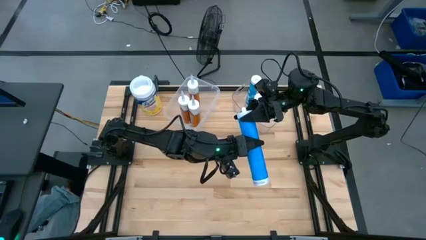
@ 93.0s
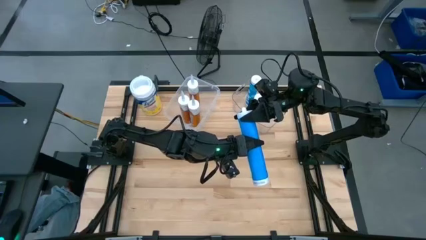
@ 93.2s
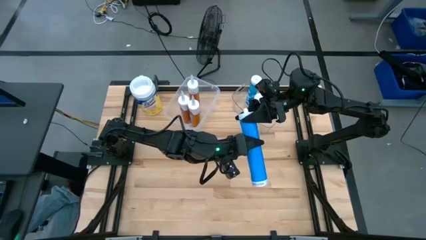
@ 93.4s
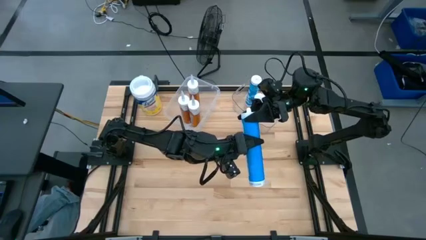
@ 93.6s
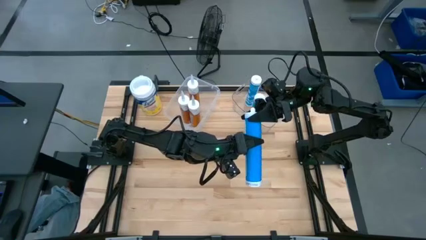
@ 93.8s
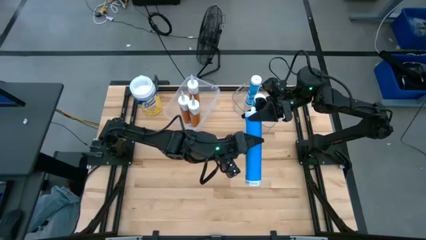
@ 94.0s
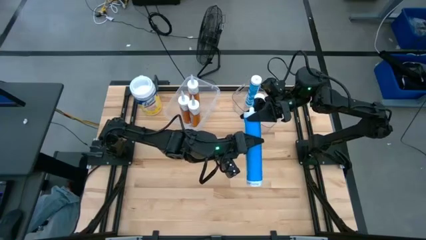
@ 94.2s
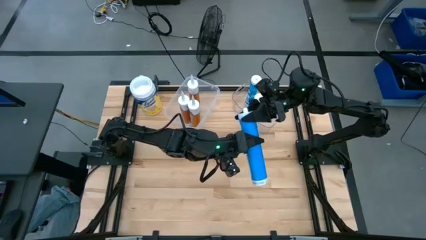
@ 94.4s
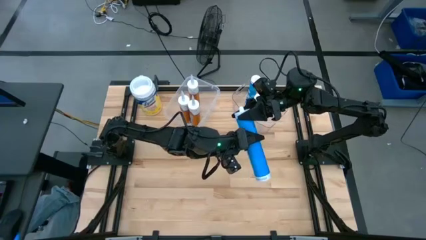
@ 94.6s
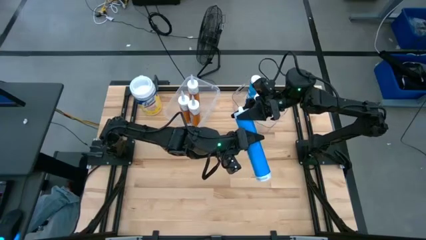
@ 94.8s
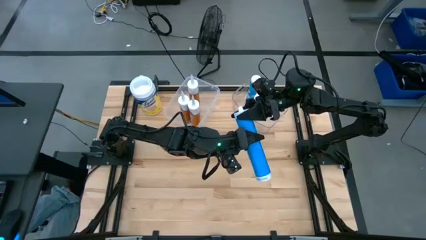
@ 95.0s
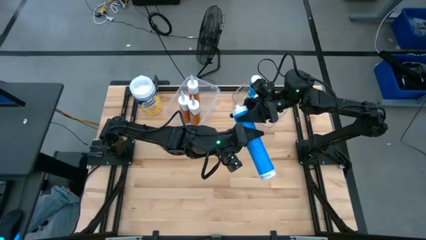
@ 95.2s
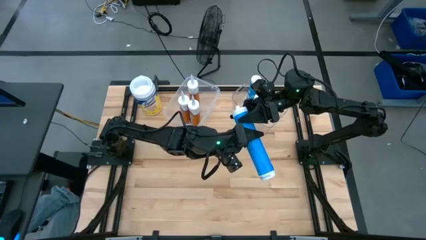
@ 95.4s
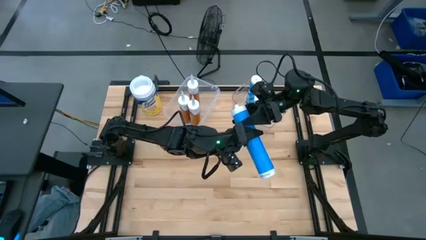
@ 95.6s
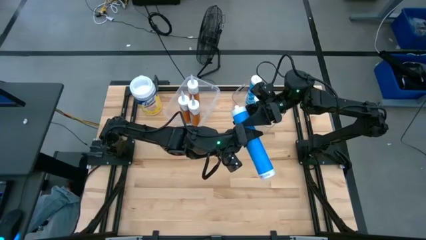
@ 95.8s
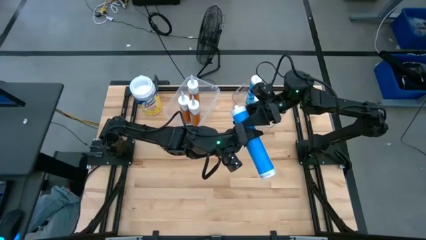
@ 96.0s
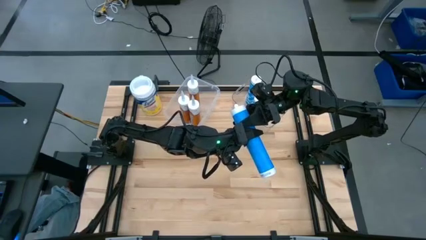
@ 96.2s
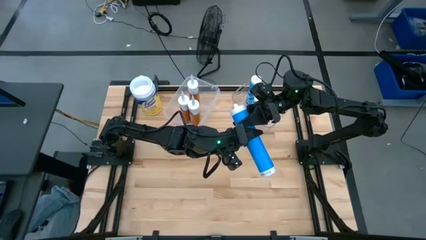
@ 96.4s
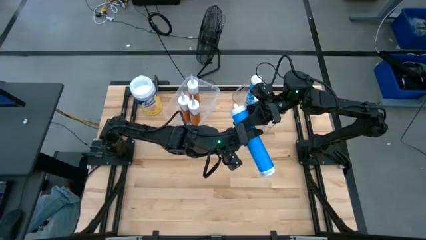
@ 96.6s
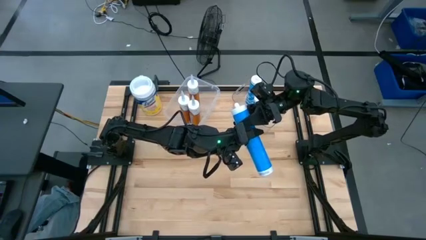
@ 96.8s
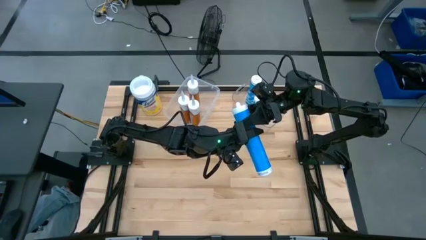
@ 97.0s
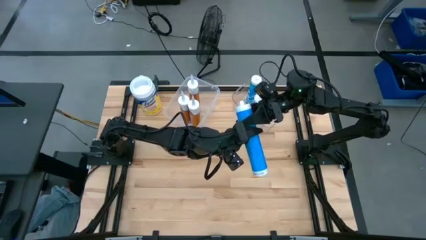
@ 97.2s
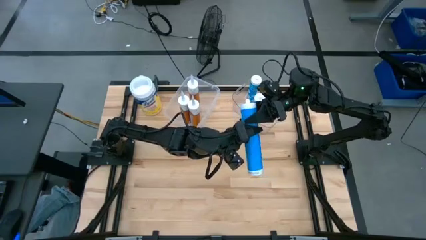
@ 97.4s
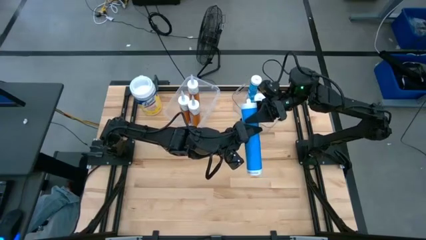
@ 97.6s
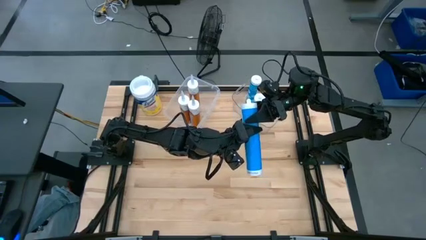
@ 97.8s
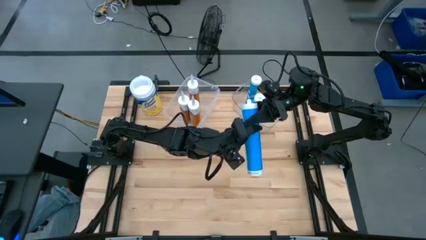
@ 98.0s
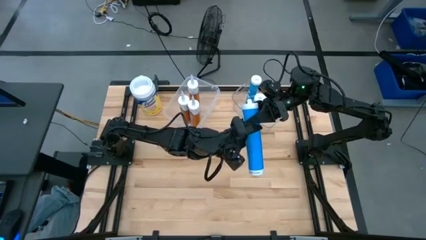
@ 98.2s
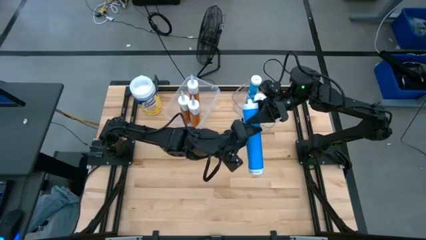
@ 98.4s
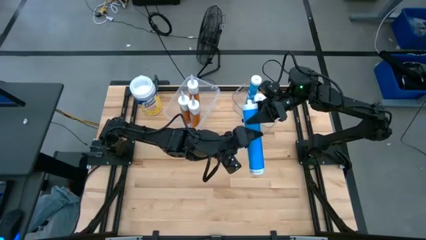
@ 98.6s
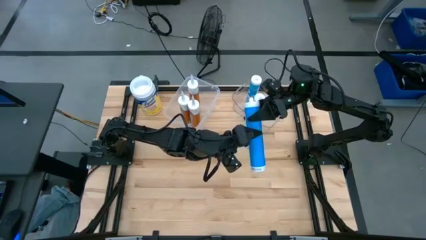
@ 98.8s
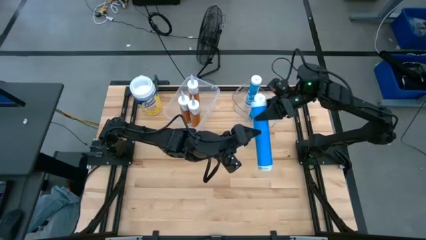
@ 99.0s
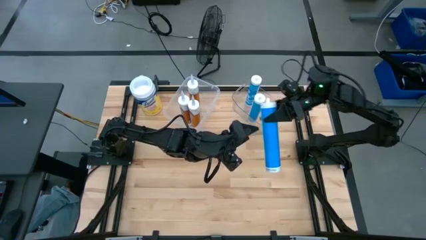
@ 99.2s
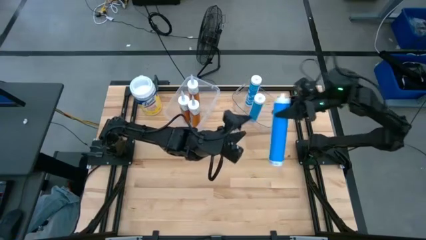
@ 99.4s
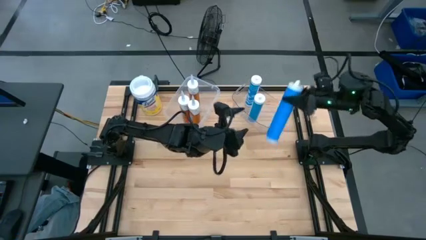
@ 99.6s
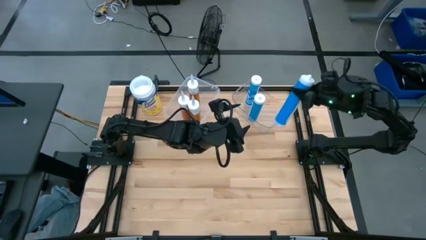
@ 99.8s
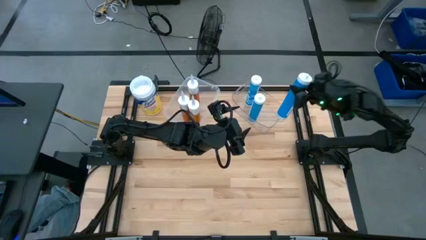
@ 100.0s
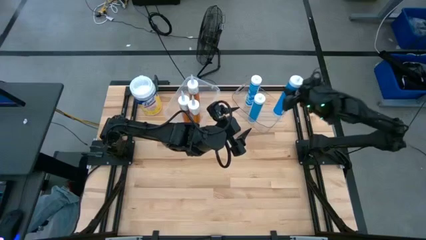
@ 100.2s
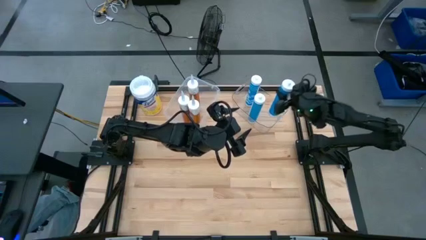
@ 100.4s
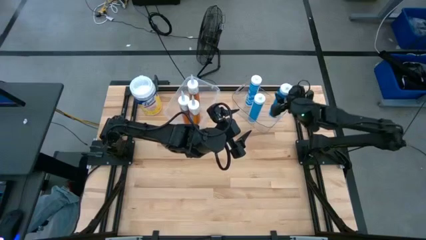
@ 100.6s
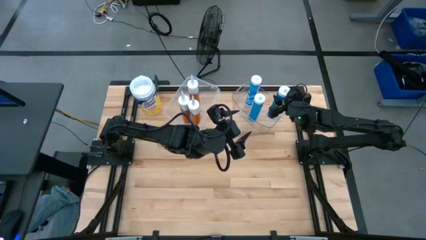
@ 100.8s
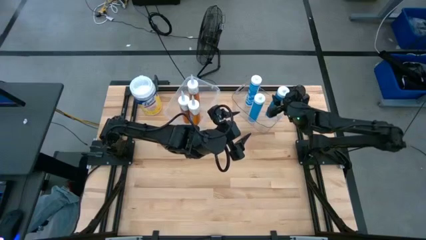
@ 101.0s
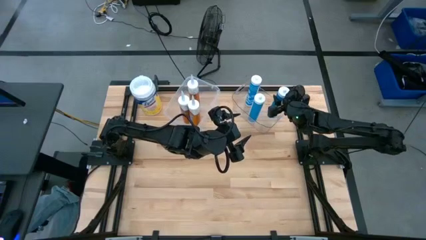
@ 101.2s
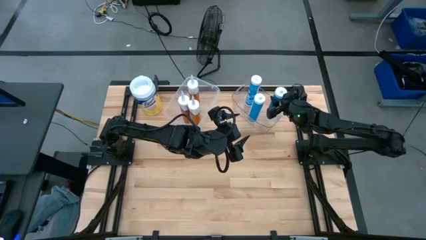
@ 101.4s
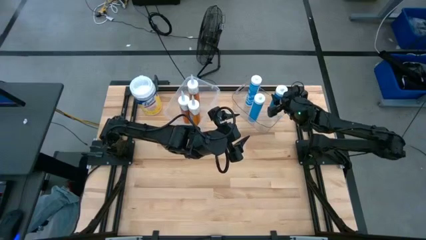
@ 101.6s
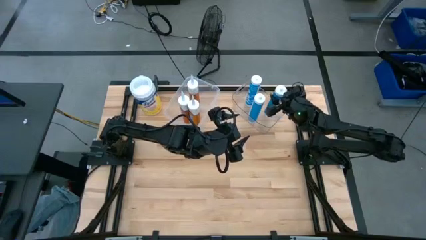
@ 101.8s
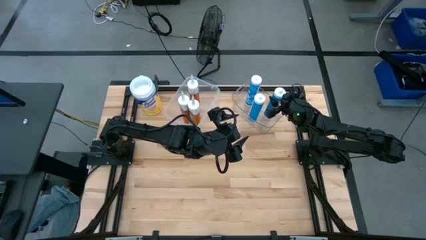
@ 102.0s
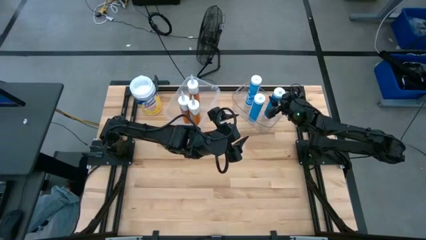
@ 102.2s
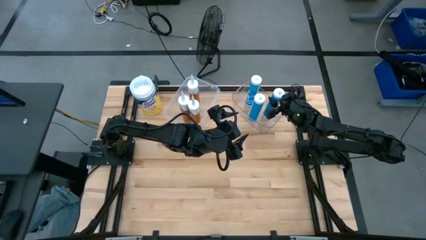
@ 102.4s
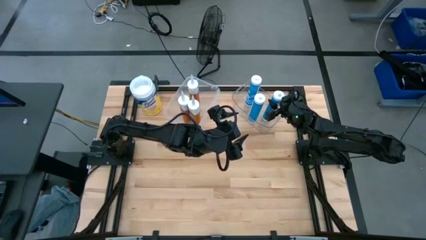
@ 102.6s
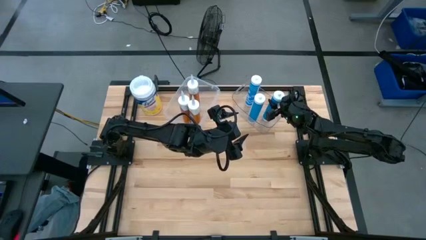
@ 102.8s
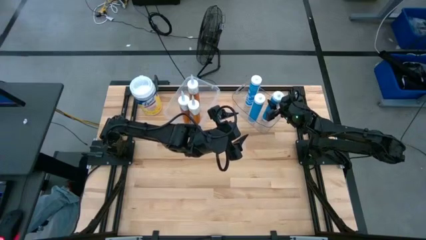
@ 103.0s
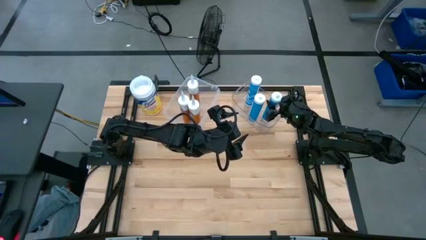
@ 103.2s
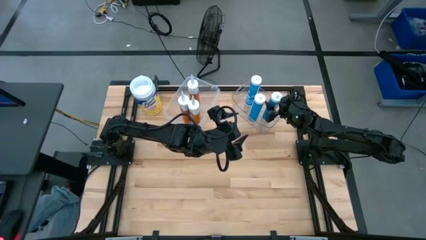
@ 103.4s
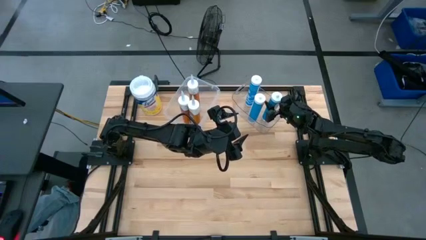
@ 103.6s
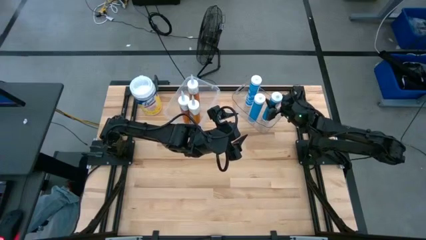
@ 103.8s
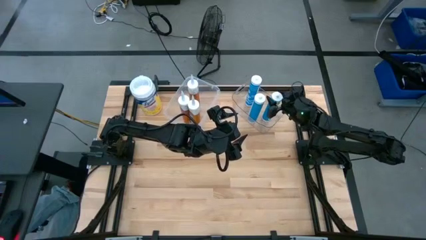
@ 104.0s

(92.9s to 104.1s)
Task: Pick & place silicon tubes, Sealant and Lysol wipes
Put the blue sealant into the right transparent bin

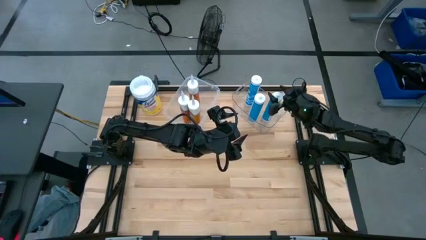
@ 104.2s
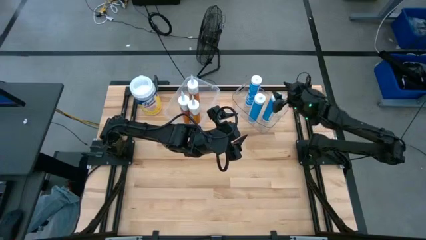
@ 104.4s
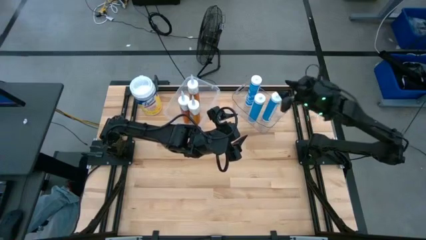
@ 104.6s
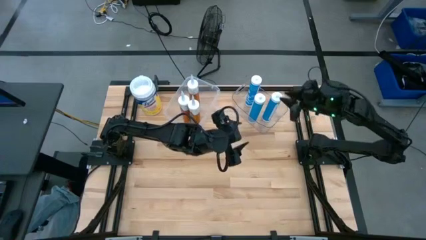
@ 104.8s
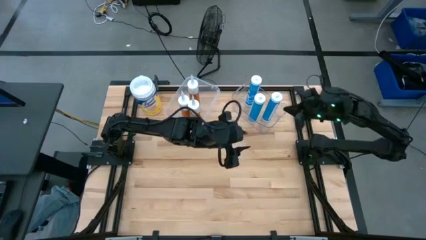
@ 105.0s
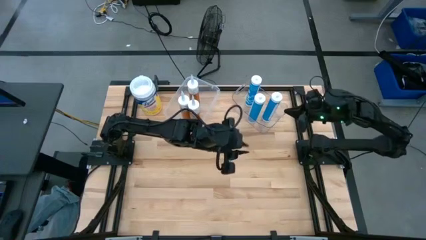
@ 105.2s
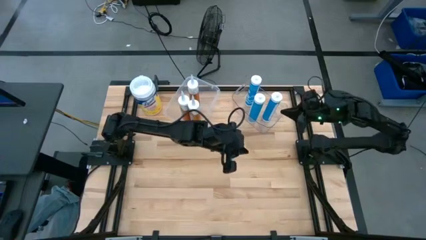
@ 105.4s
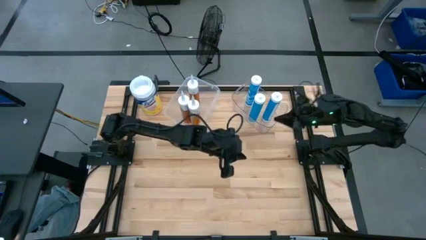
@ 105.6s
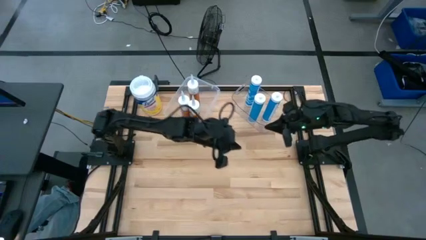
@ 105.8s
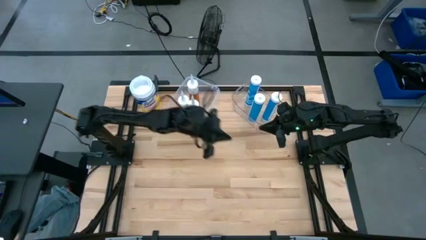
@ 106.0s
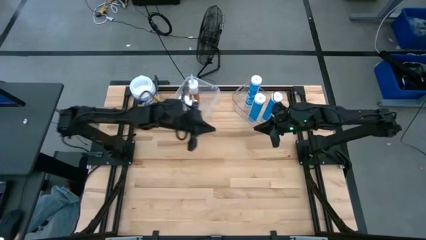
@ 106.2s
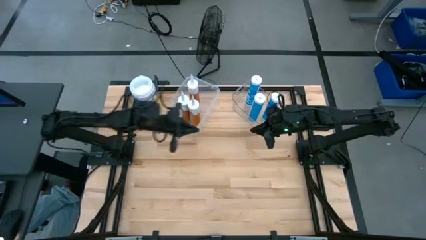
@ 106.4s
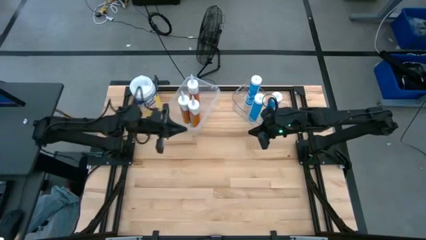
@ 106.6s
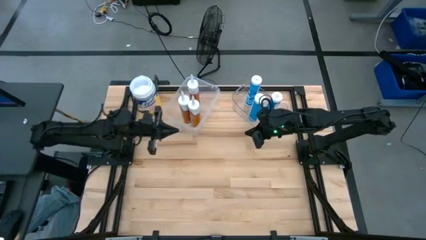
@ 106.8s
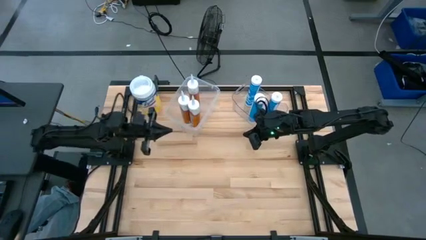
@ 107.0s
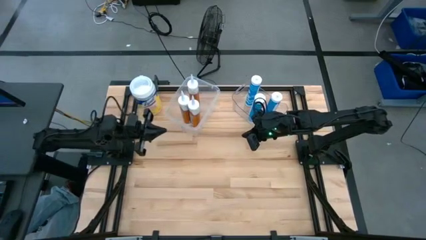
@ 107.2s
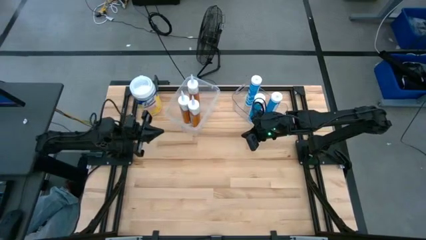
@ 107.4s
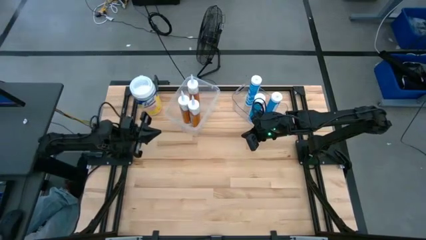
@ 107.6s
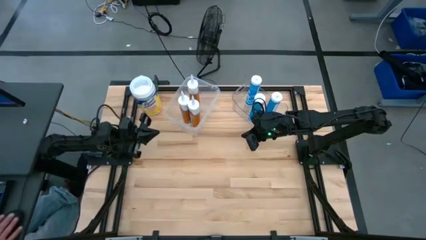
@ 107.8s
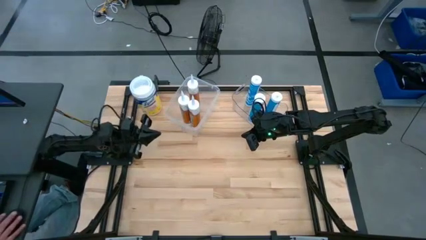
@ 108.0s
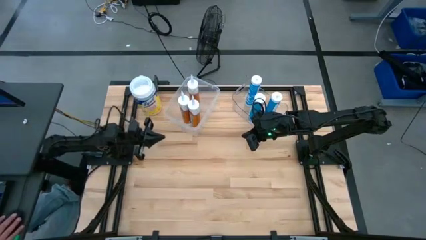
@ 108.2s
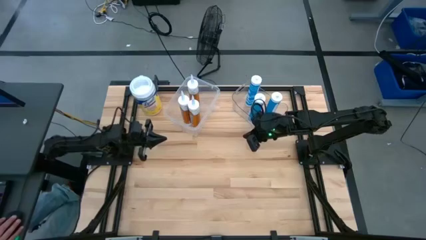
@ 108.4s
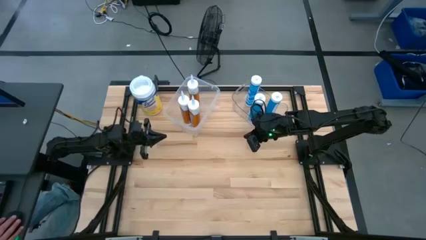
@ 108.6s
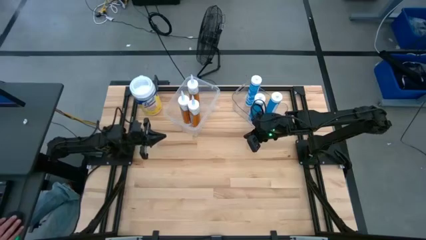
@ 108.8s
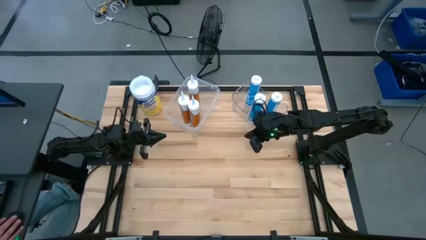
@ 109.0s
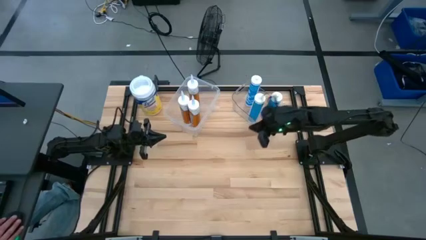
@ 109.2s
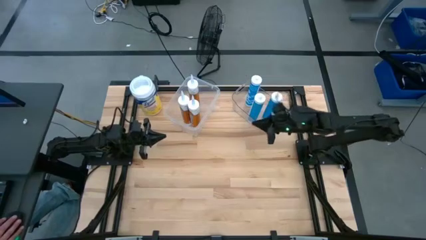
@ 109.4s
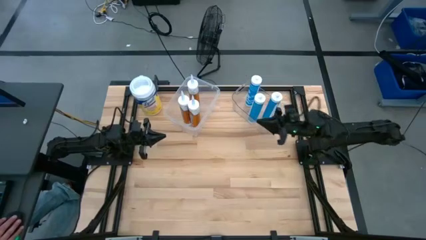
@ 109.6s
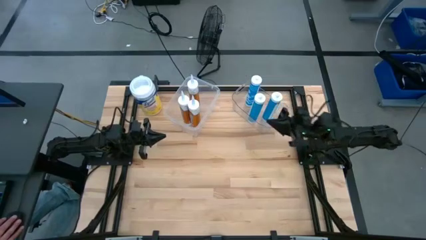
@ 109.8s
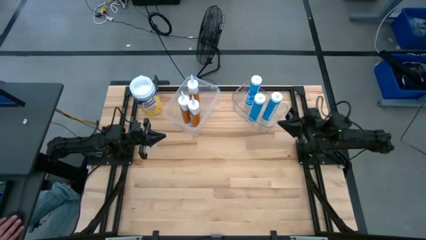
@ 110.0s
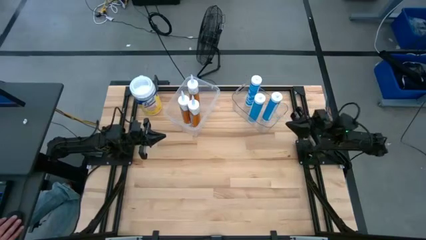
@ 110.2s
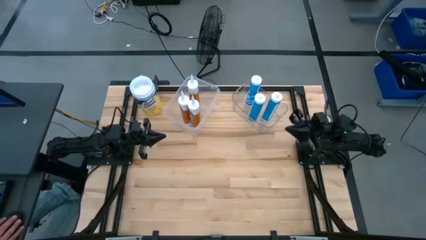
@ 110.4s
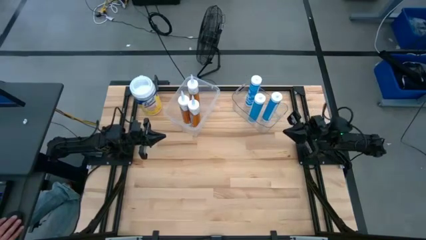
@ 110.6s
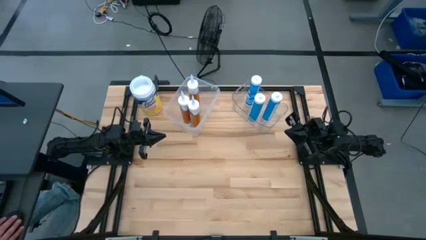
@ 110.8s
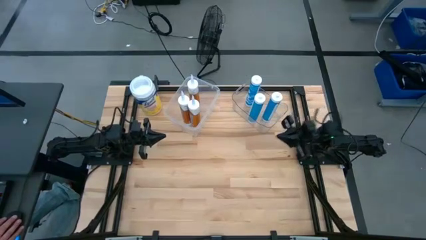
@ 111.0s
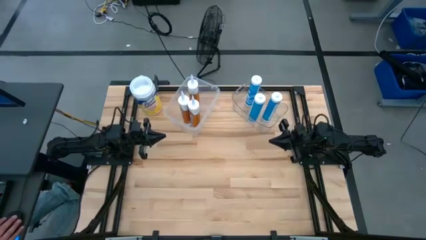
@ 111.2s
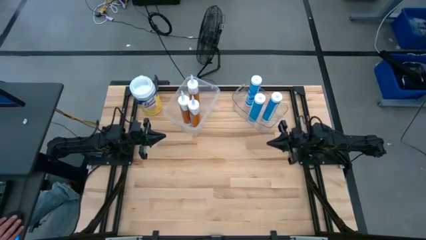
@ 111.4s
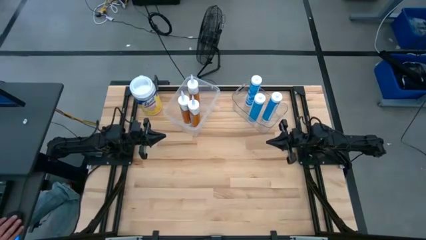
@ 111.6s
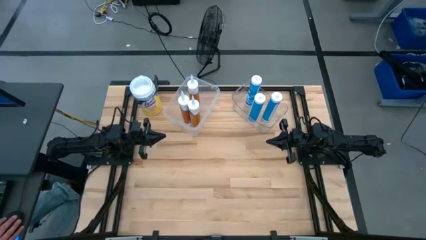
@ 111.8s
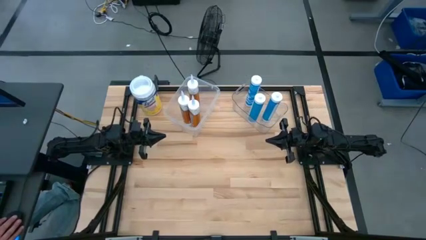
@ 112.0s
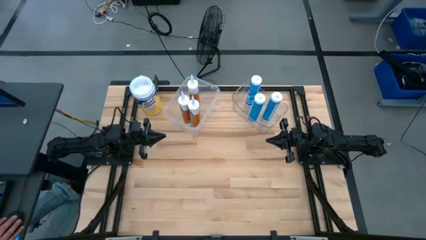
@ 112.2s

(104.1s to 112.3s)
Return to Home Position
